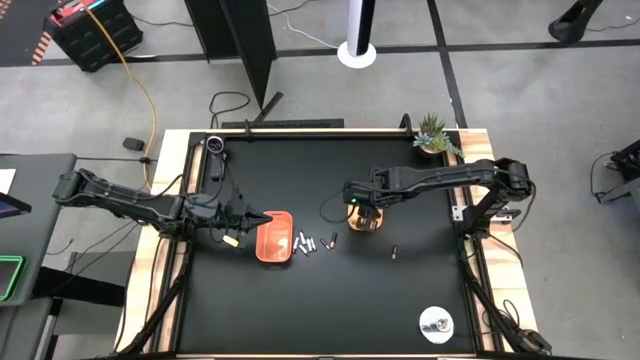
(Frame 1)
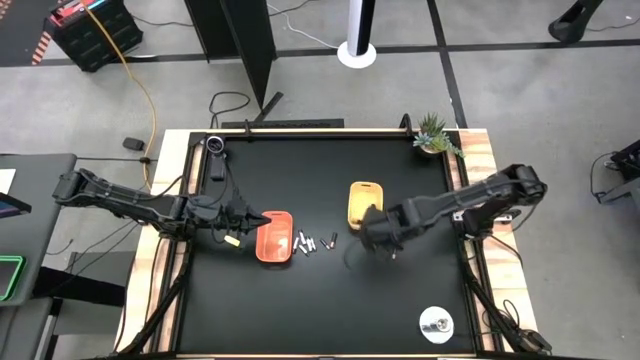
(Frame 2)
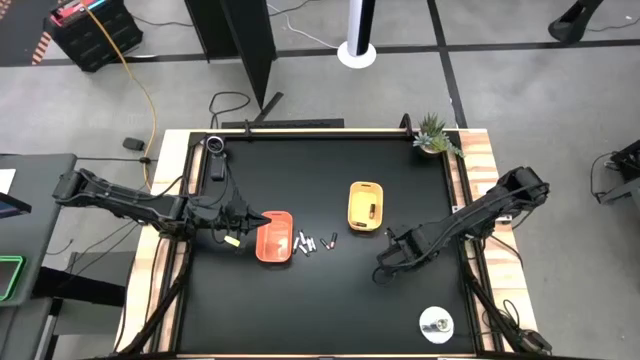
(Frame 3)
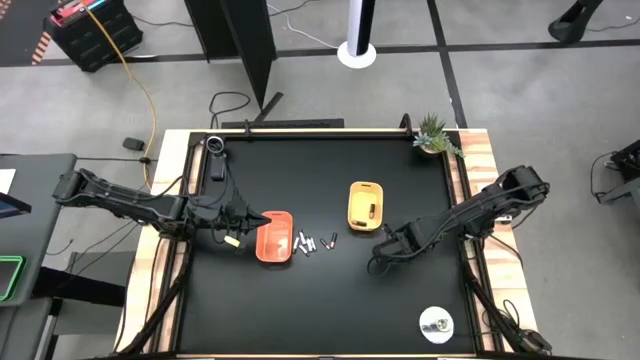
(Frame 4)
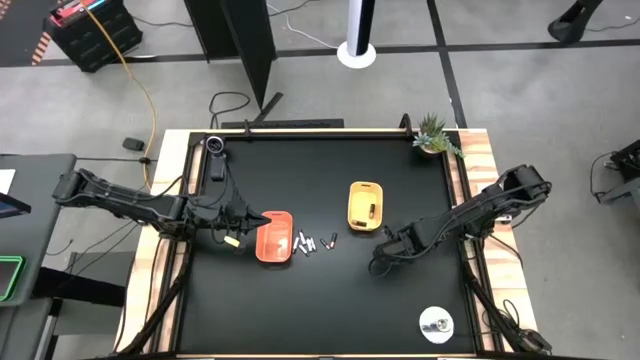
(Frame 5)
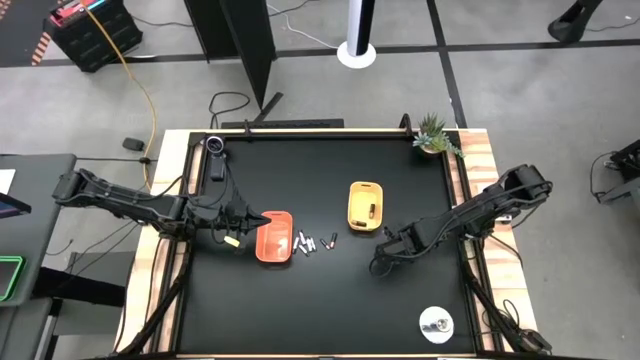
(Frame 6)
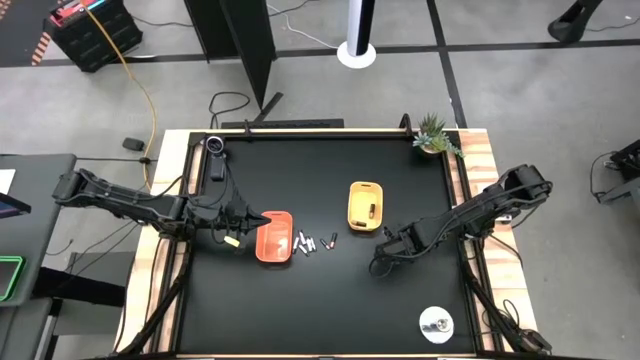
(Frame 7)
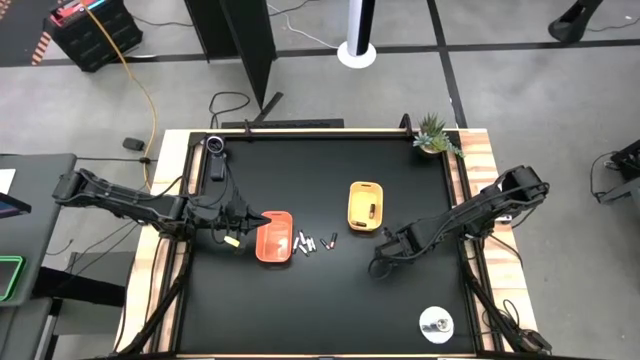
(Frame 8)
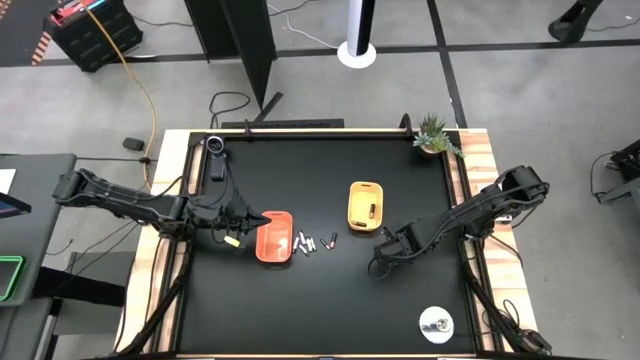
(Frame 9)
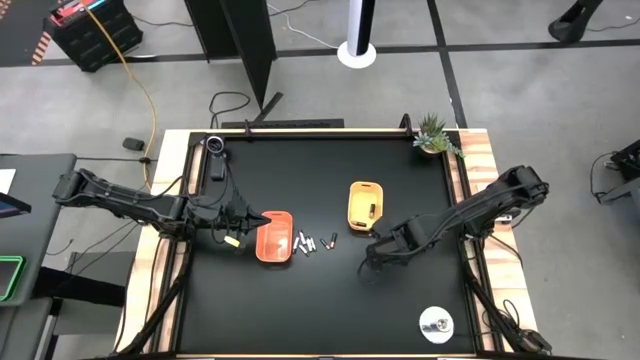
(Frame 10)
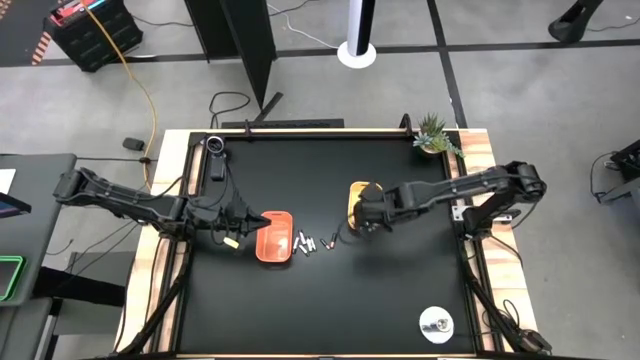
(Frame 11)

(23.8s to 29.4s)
Task: Sort batteries
Put the small brown battery into the yellow bin

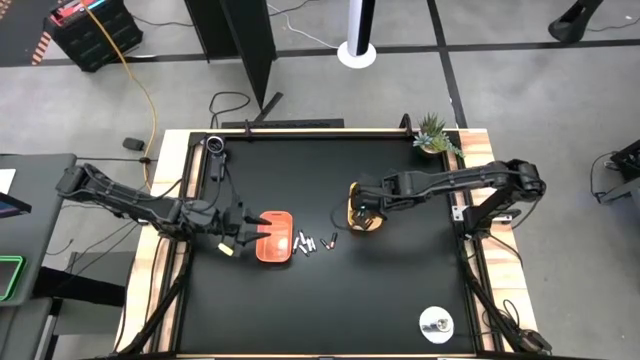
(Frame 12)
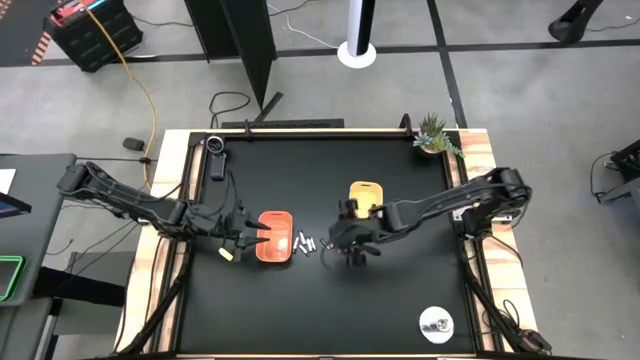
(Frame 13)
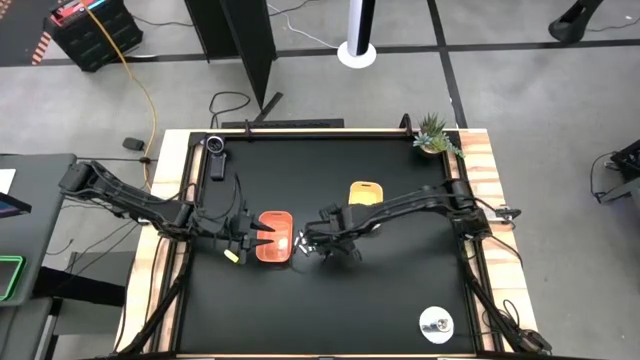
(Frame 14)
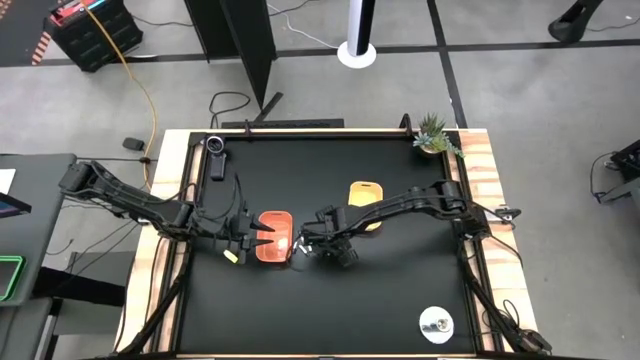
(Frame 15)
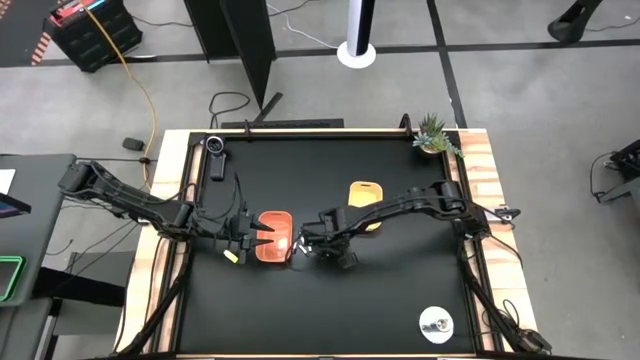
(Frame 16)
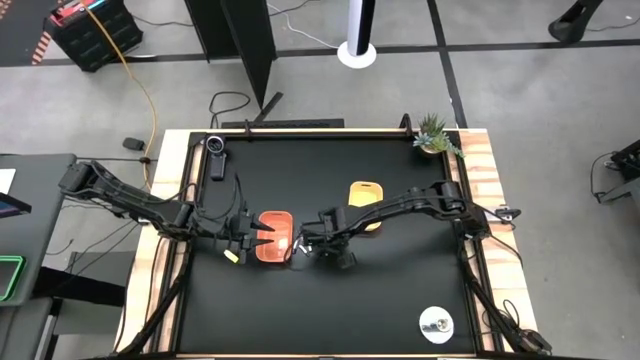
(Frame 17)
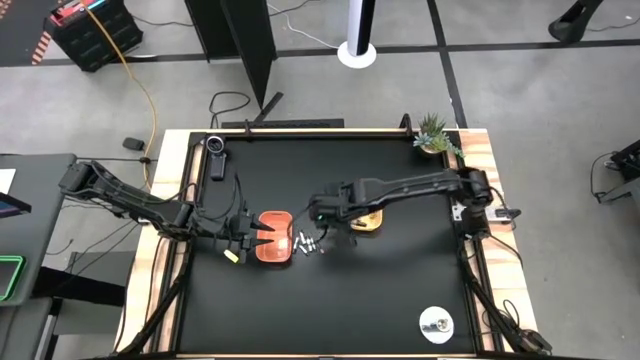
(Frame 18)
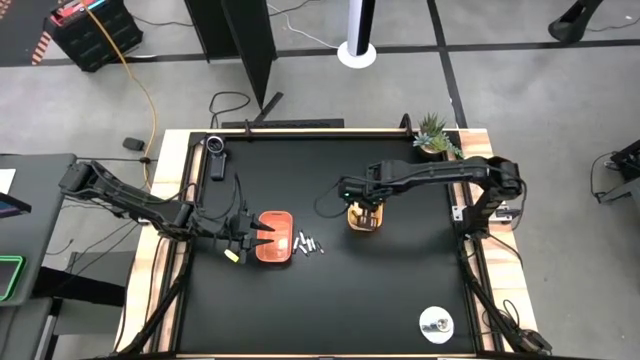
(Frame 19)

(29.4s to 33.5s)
Put the big brown battery into the yellow bin

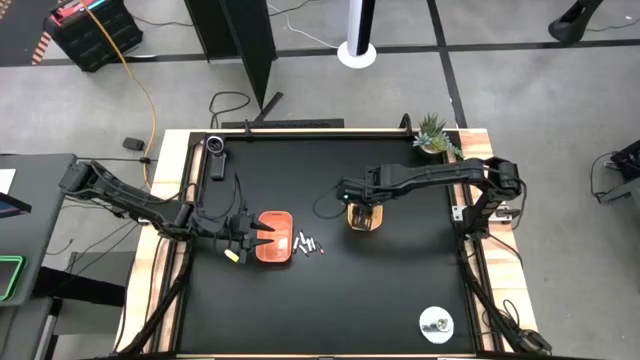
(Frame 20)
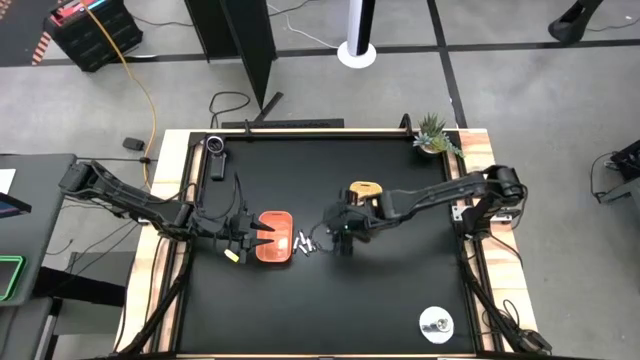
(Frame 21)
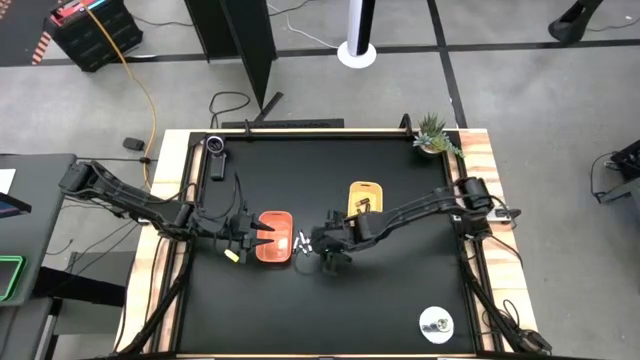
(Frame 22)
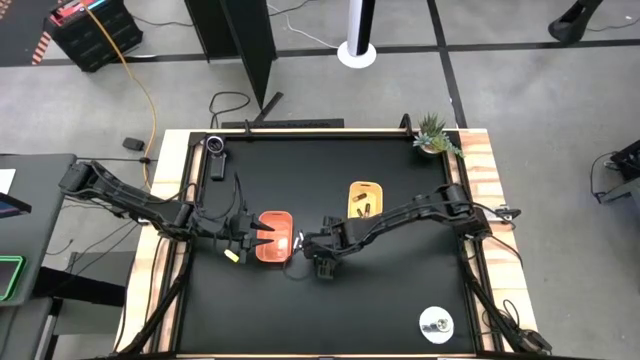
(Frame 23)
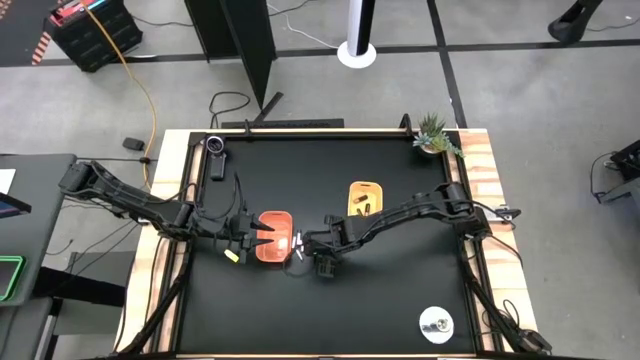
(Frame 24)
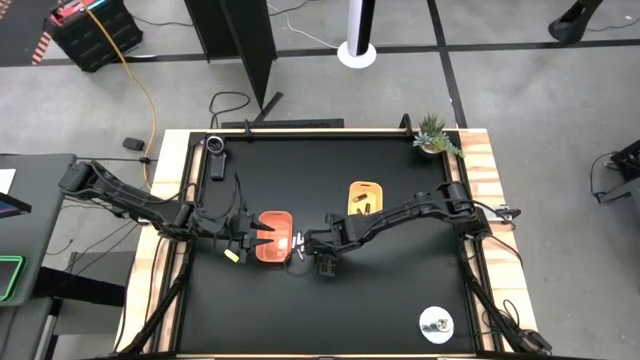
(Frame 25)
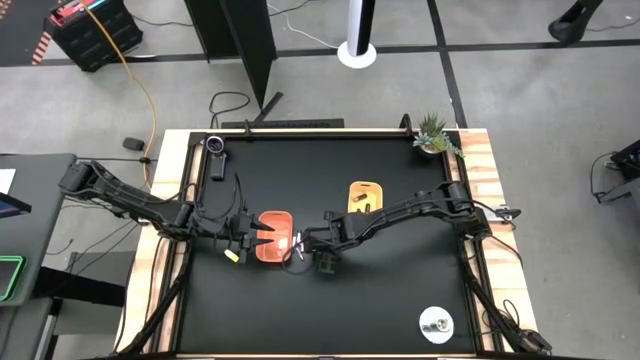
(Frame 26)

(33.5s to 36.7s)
Put the small brown battery into the yellow bin

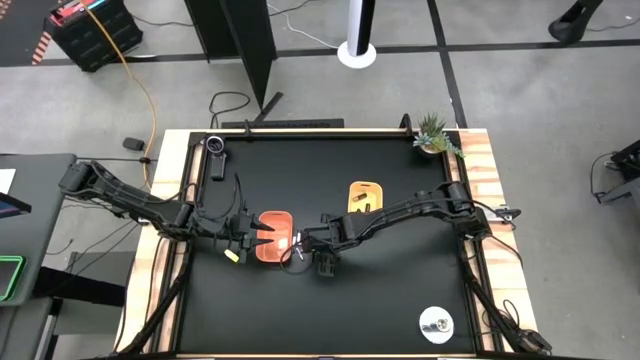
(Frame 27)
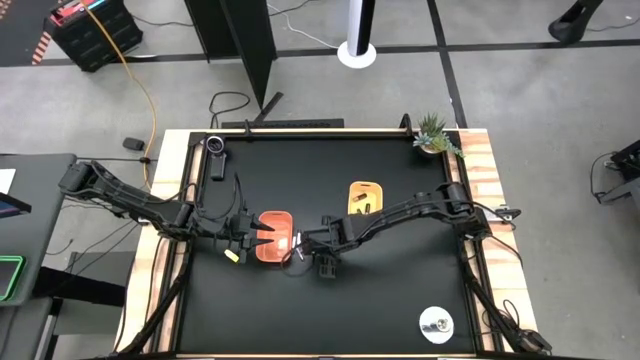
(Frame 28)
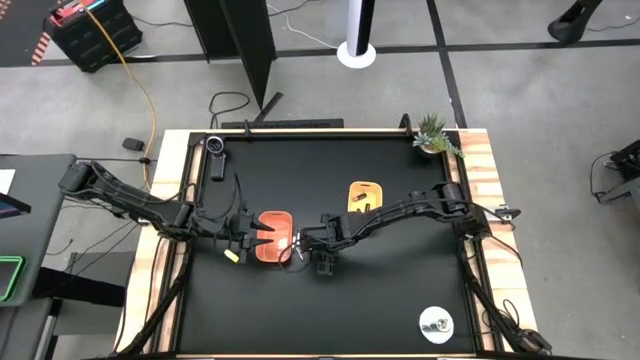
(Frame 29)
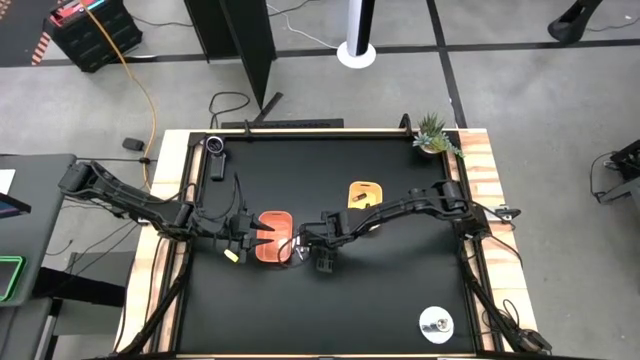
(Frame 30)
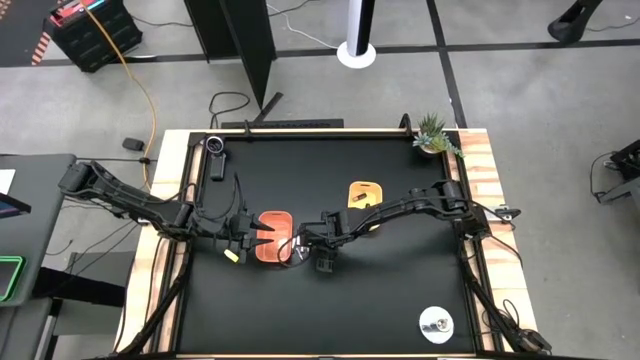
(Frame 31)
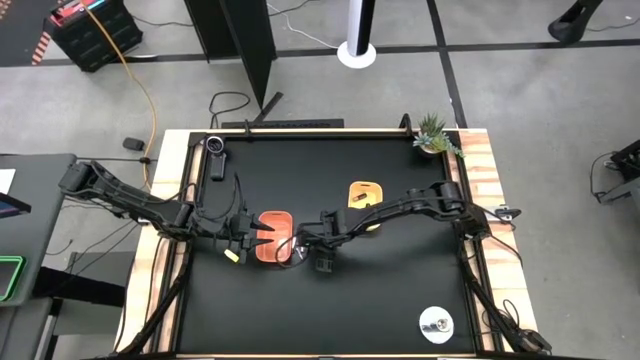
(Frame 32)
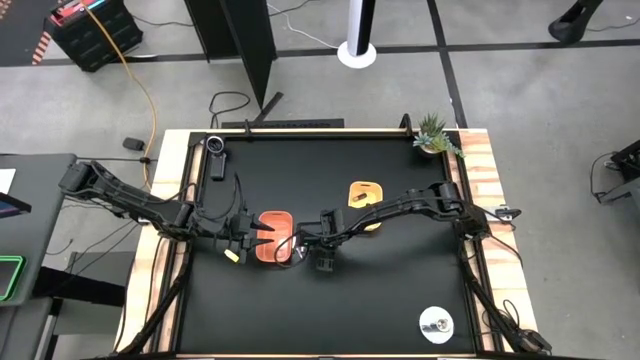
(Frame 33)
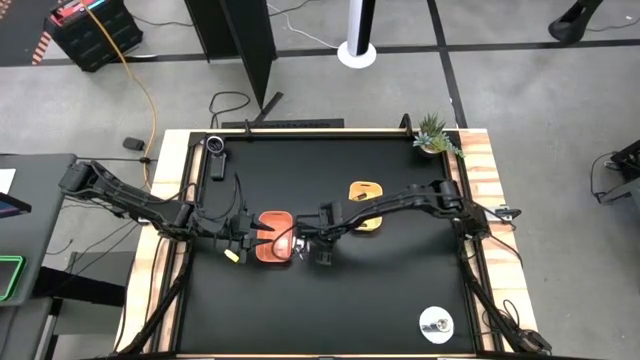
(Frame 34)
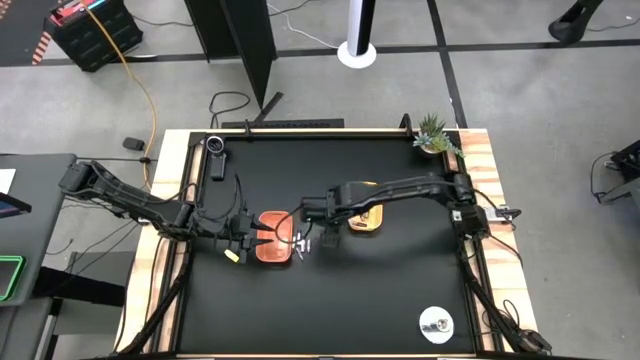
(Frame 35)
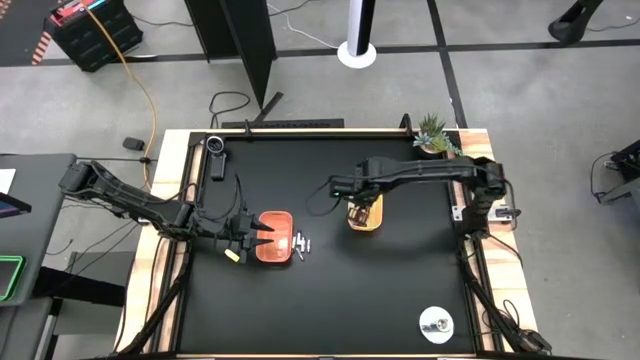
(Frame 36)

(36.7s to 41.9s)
Put the small brown battery into the yellow bin

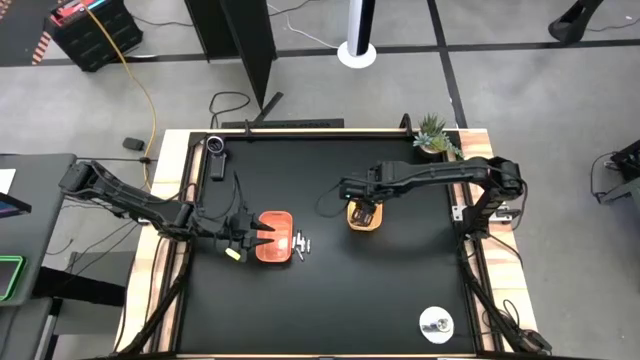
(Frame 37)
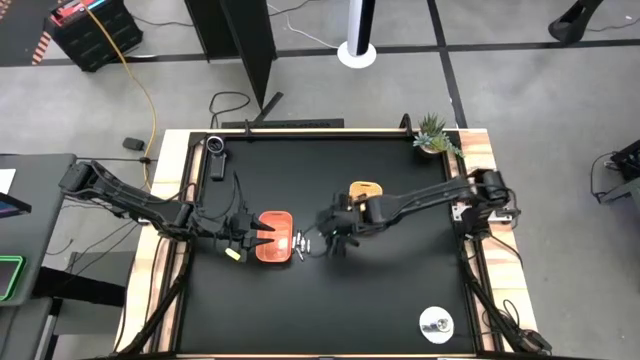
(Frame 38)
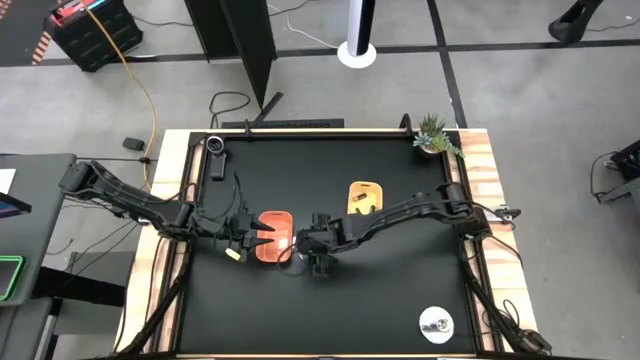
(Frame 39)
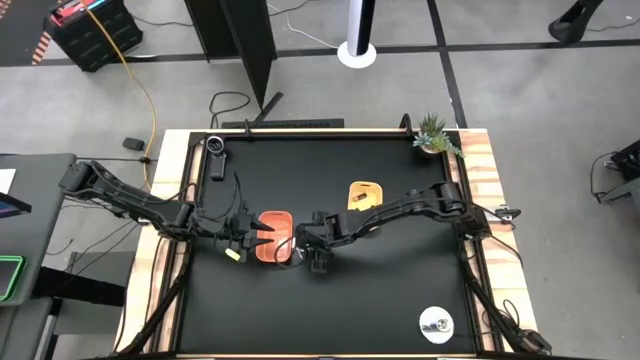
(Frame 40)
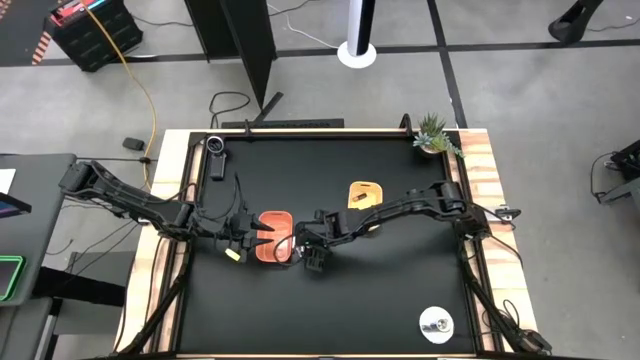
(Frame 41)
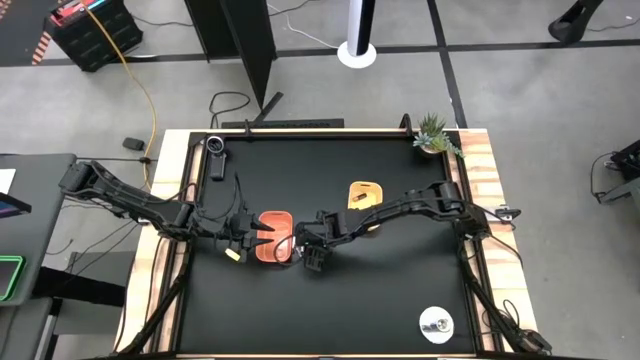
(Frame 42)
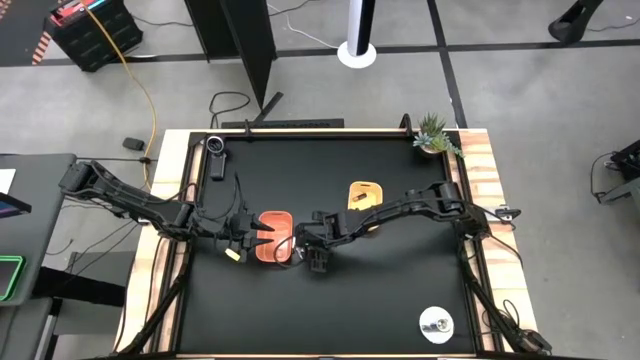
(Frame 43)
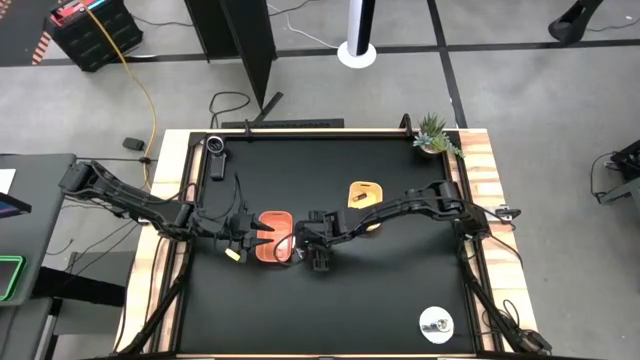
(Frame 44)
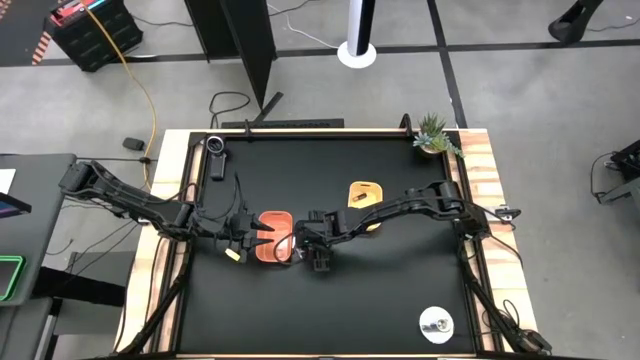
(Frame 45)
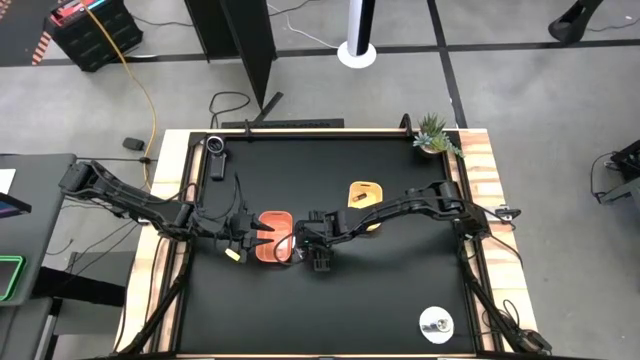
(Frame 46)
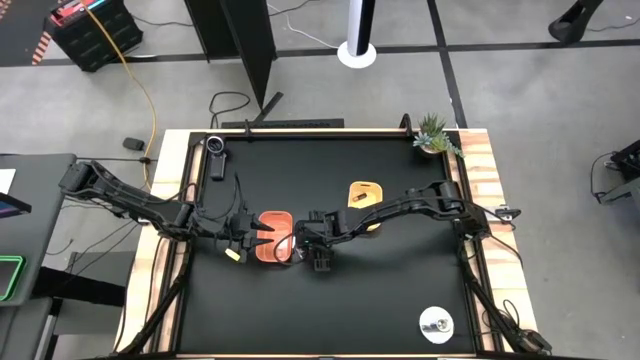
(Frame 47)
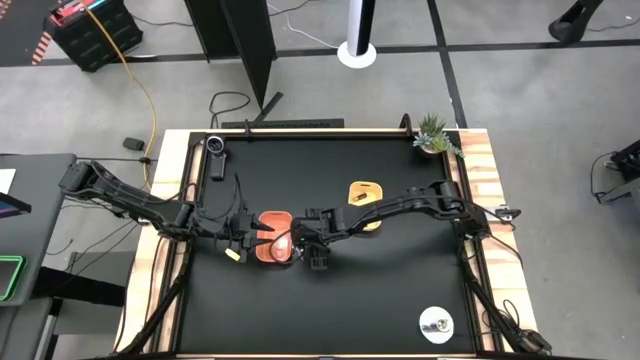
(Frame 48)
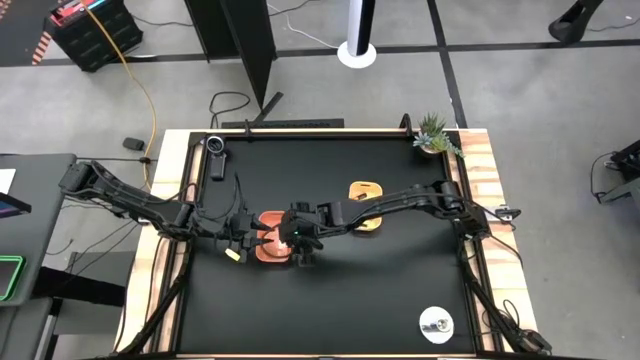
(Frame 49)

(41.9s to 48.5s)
Put the small silver battery into the orange bin
